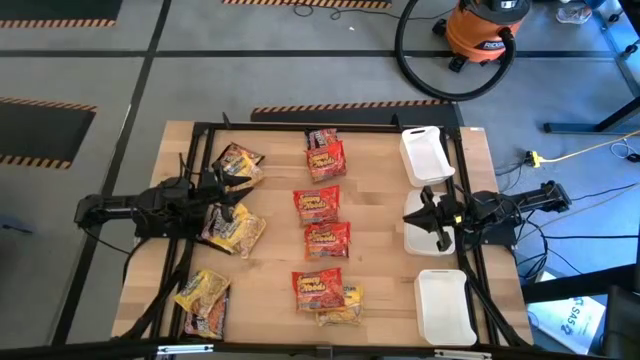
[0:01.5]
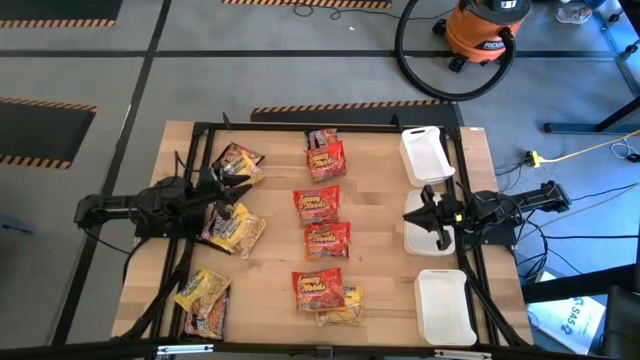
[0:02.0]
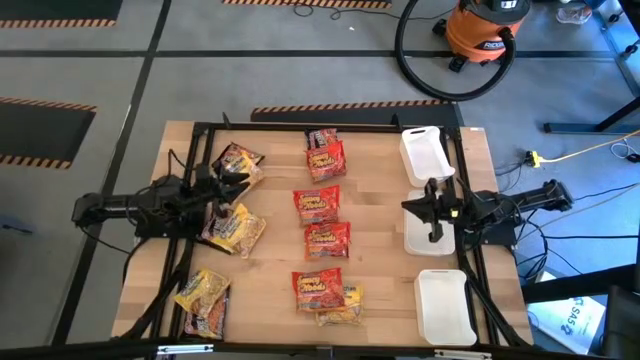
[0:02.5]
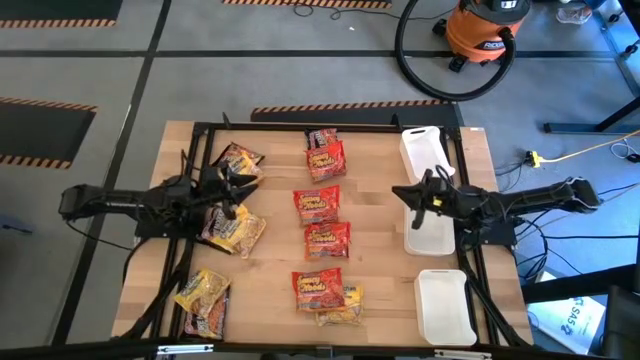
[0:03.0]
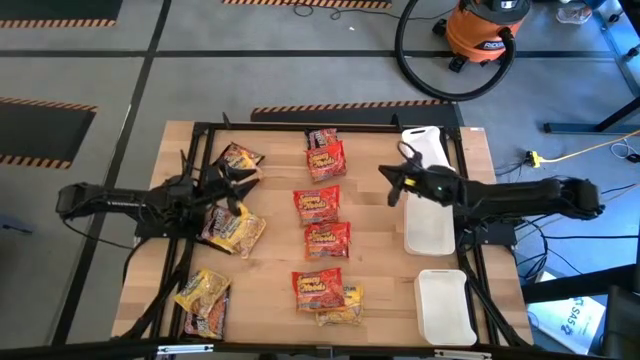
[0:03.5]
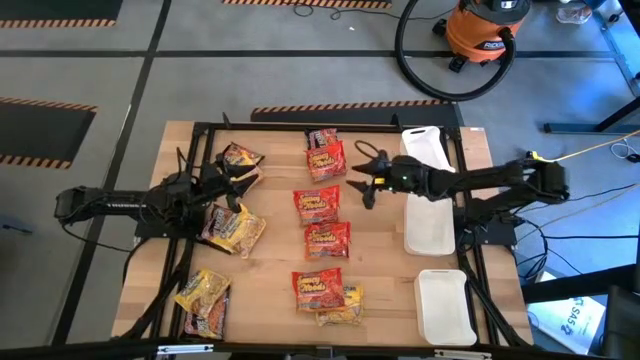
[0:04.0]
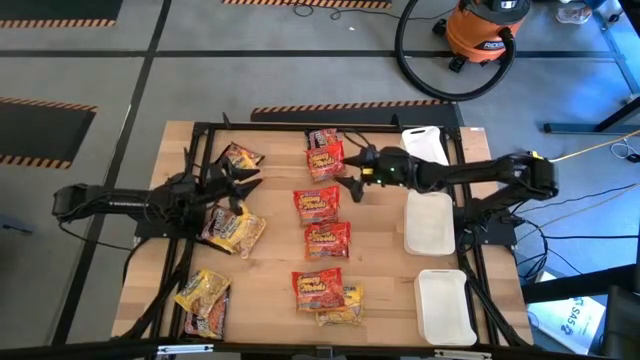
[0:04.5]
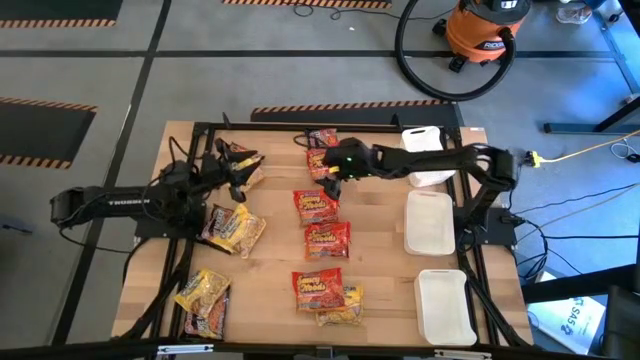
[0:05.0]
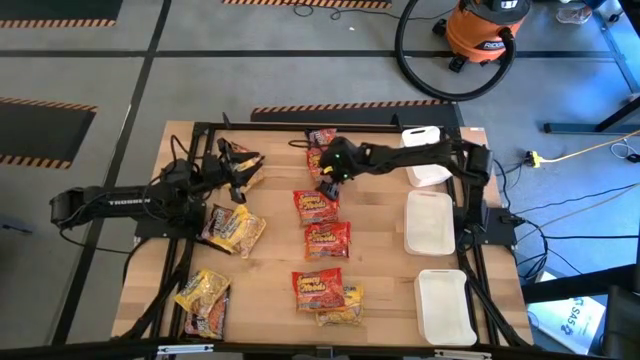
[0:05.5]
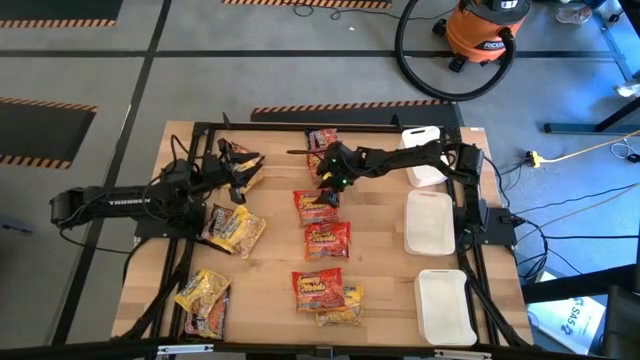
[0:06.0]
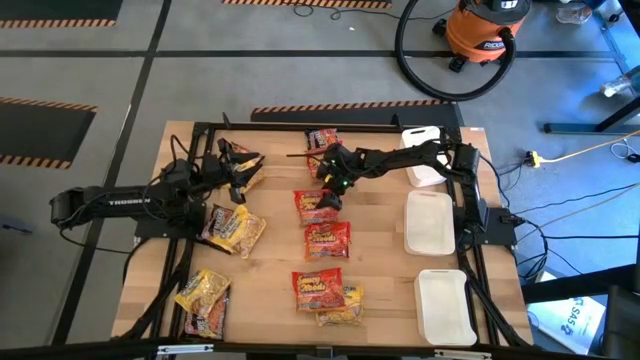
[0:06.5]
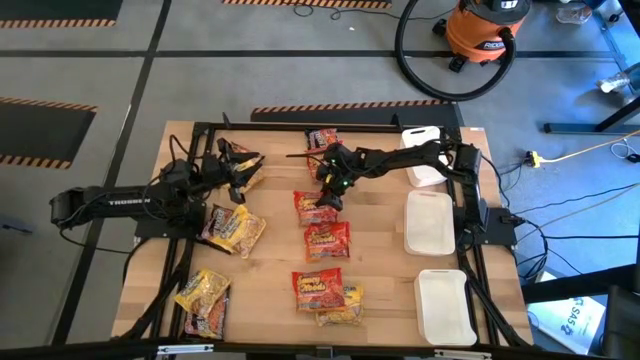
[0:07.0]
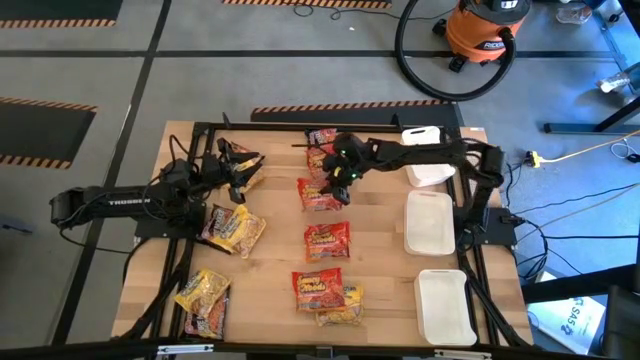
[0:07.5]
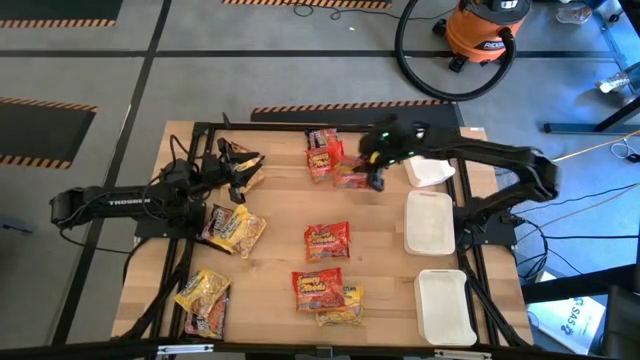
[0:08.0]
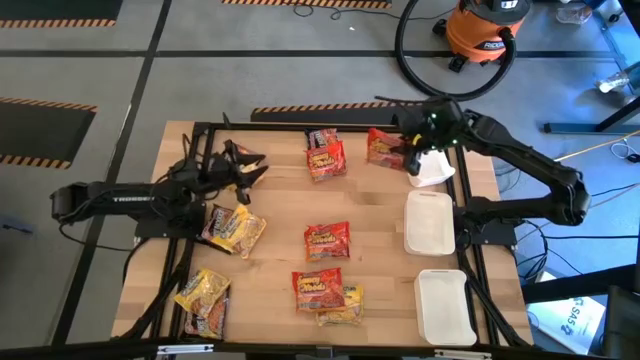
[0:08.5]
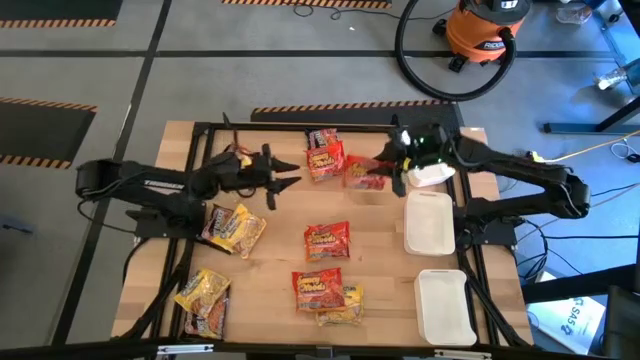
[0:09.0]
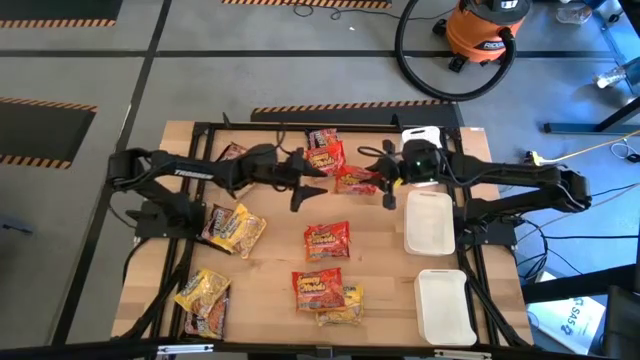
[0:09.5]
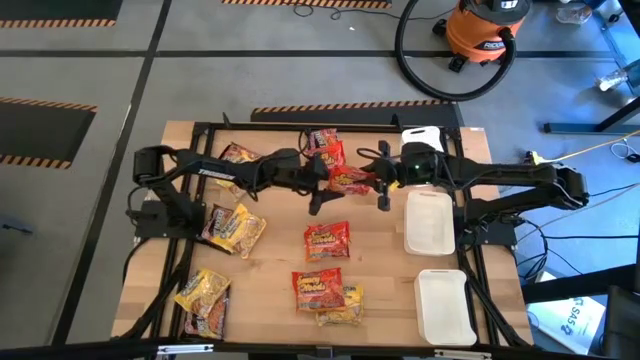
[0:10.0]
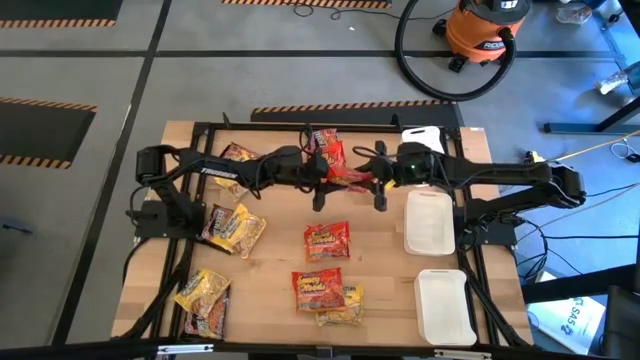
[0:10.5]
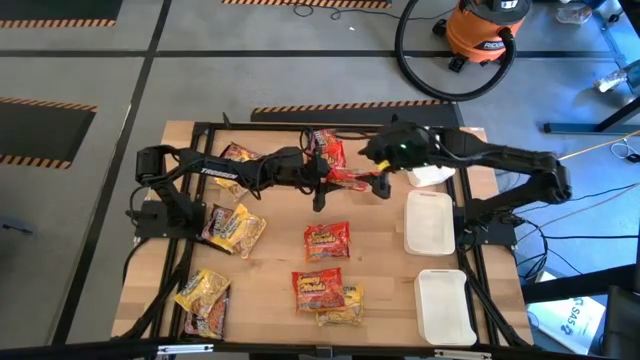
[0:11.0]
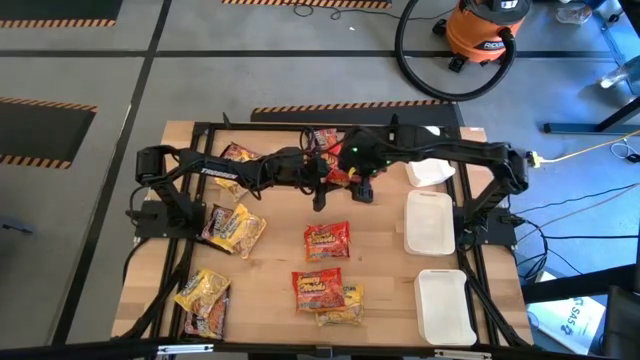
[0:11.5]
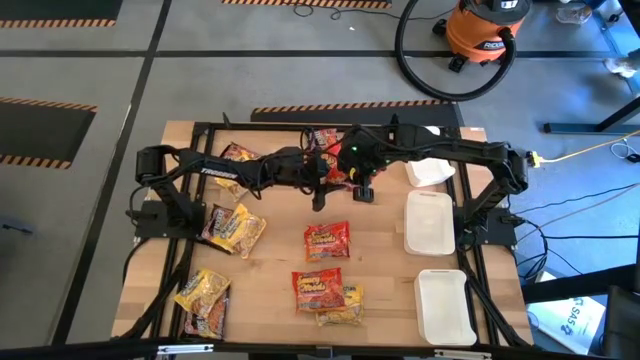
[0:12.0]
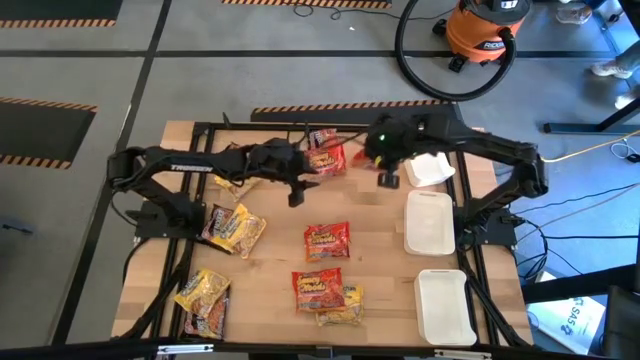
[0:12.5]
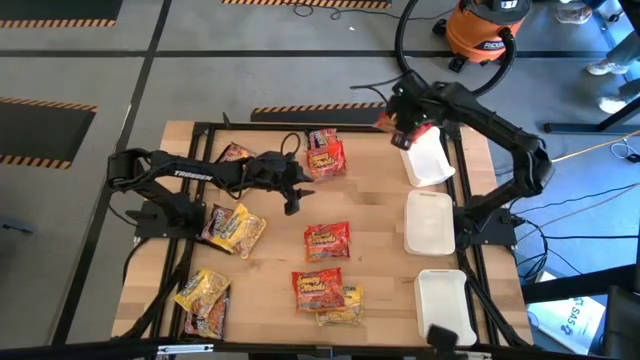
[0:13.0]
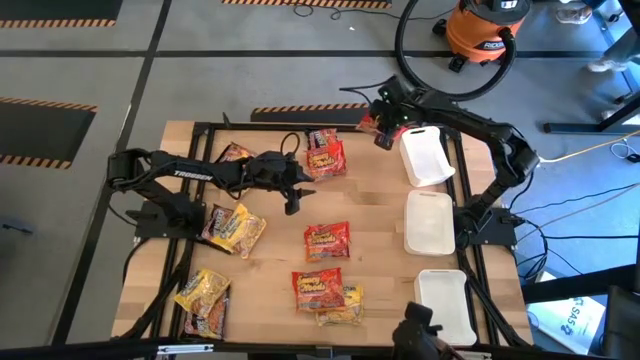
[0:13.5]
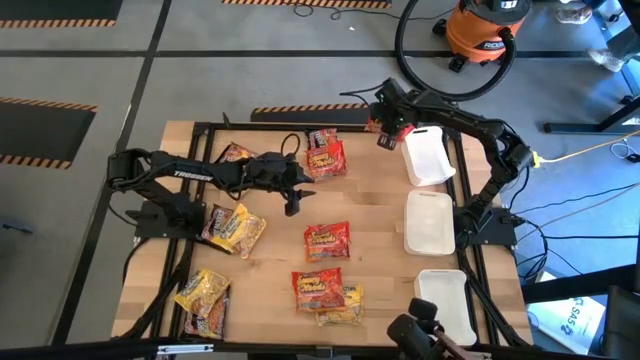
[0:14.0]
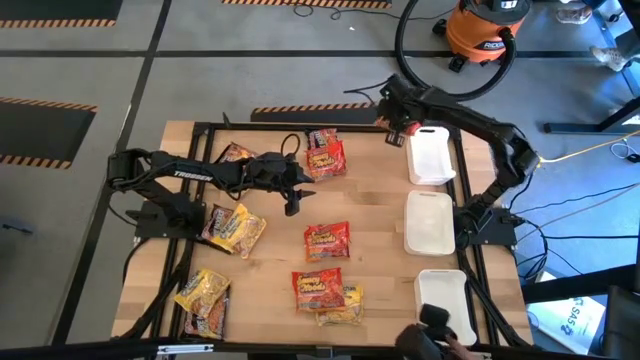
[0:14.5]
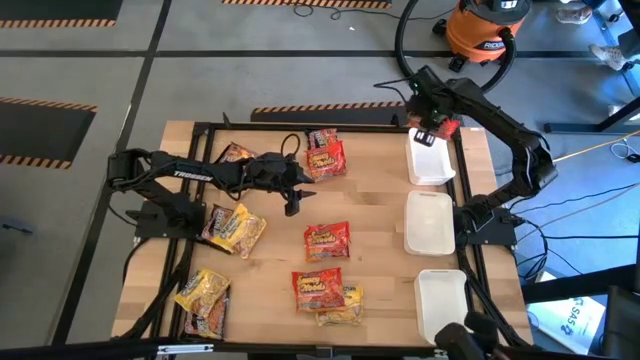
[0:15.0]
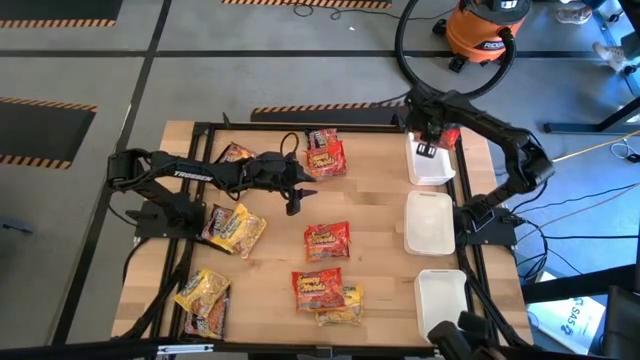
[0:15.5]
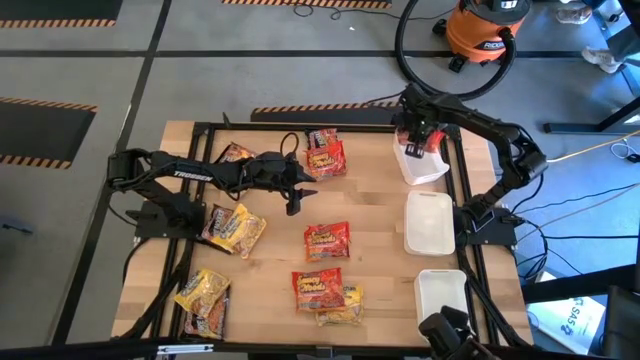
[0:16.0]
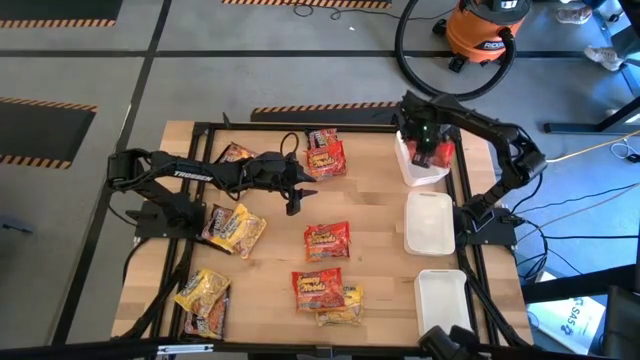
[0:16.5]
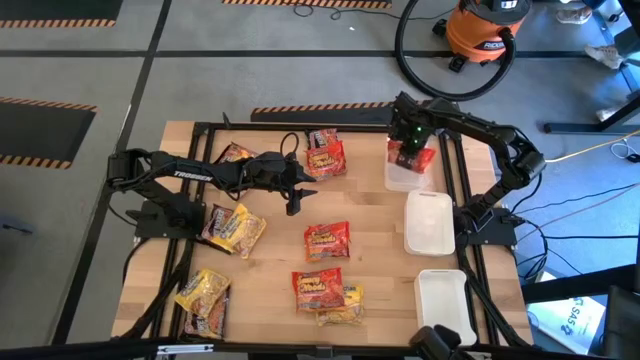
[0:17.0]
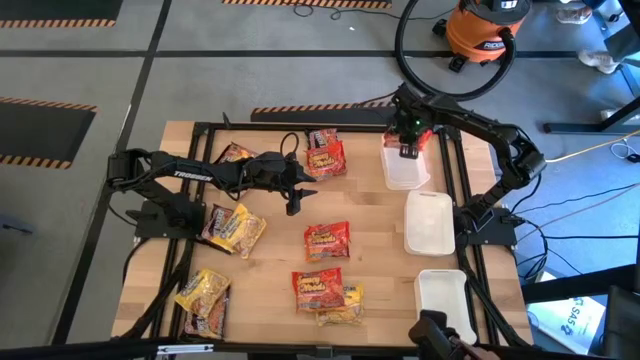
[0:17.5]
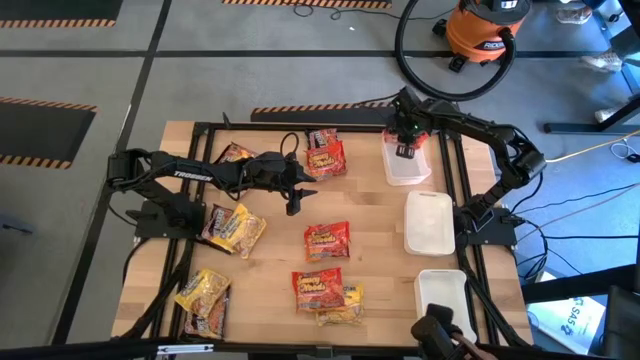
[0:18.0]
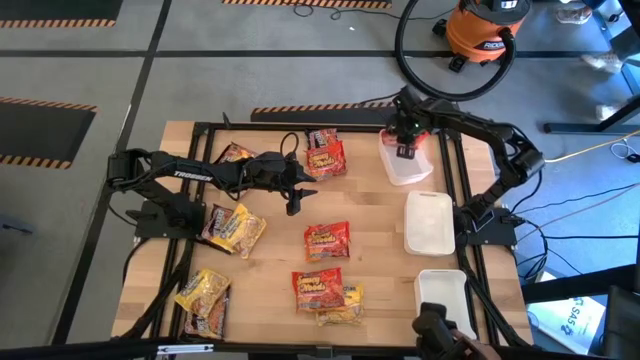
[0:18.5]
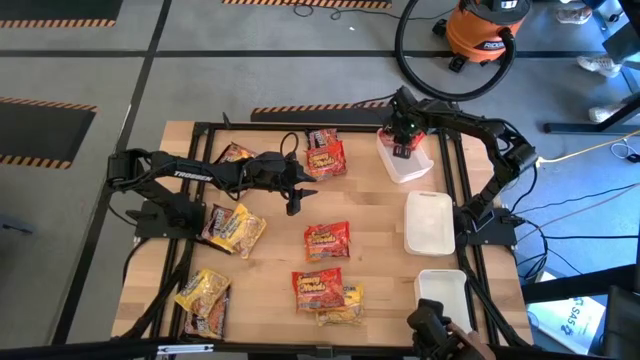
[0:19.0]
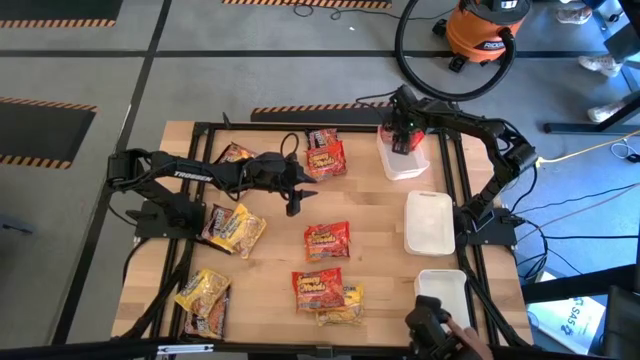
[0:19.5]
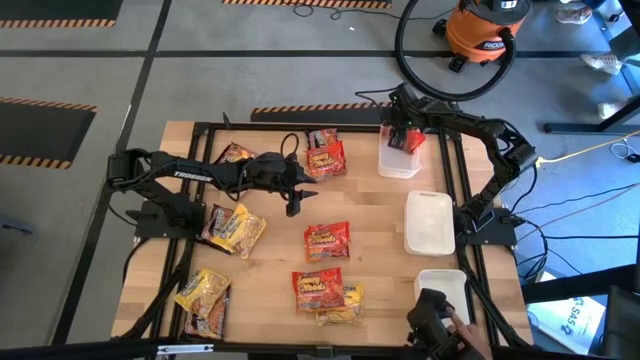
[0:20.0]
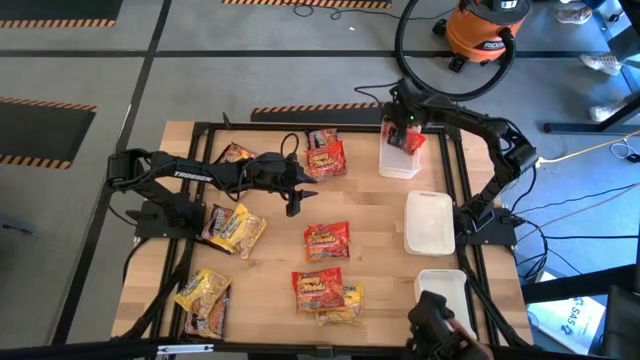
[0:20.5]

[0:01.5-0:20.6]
Task: Sort Maruchan noodles
Put the orange noodle pack into the top white bin
